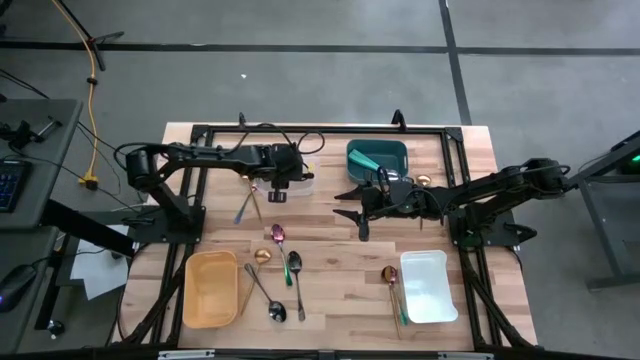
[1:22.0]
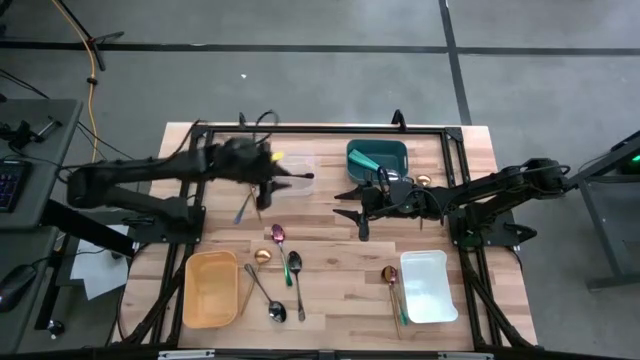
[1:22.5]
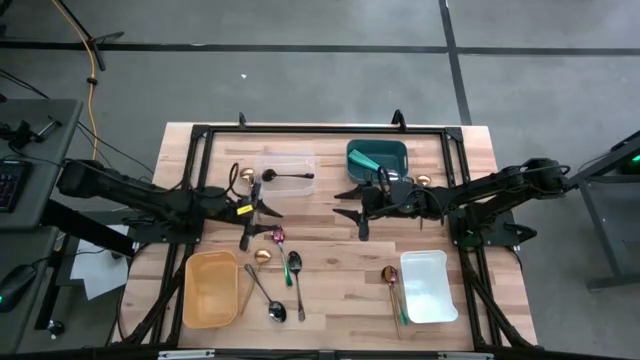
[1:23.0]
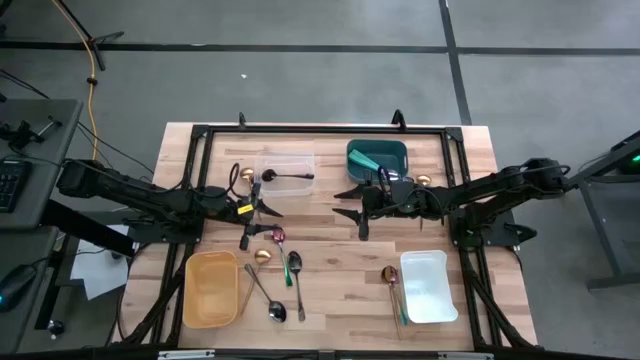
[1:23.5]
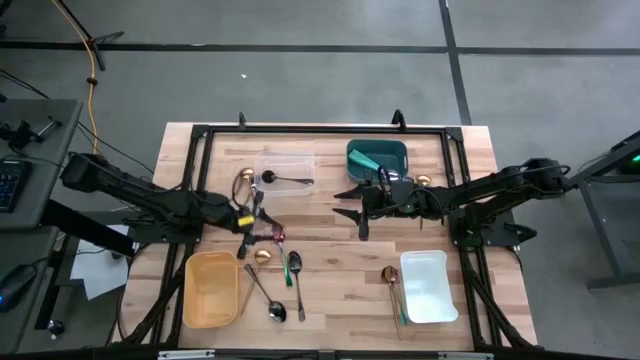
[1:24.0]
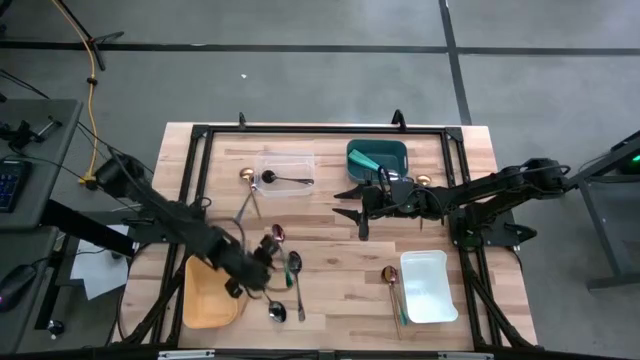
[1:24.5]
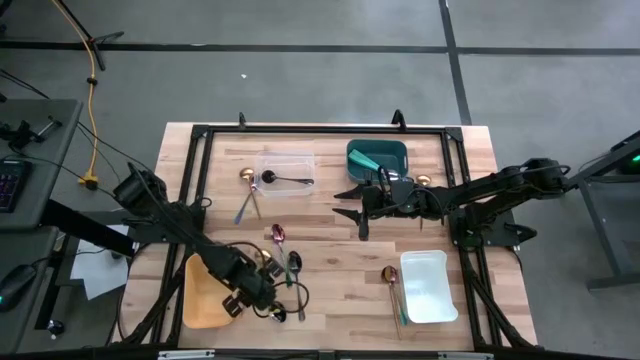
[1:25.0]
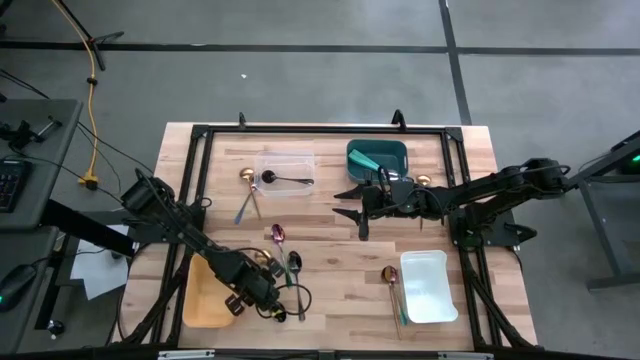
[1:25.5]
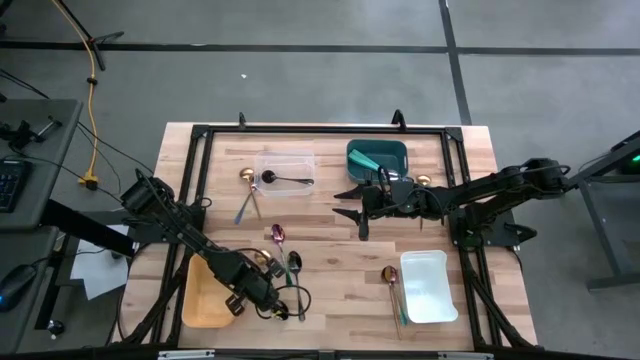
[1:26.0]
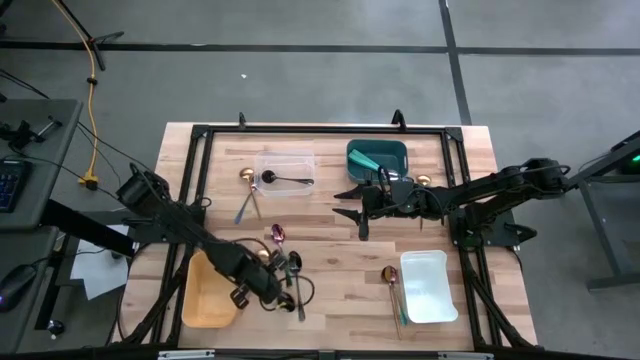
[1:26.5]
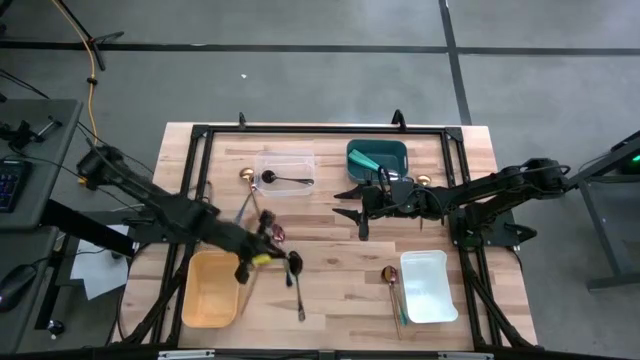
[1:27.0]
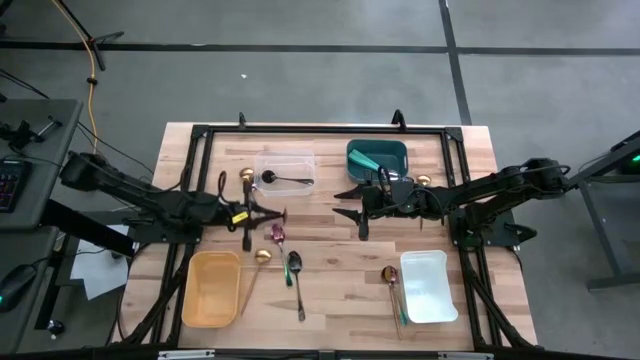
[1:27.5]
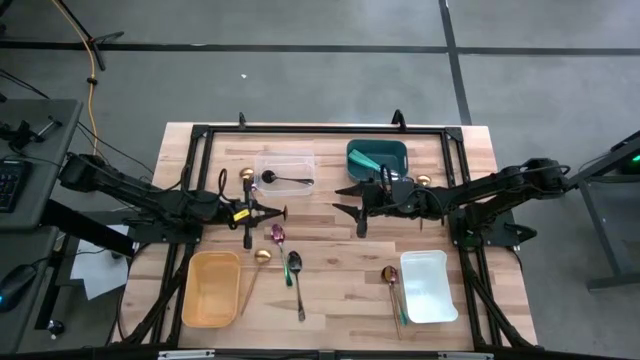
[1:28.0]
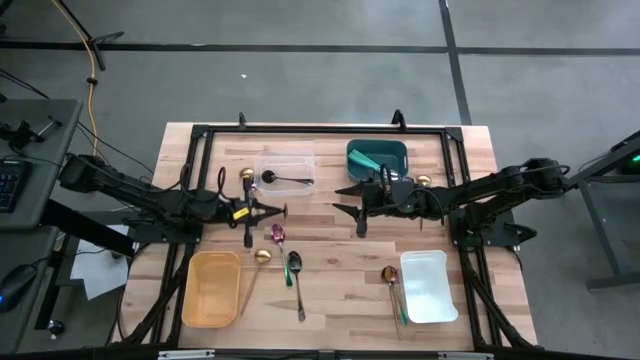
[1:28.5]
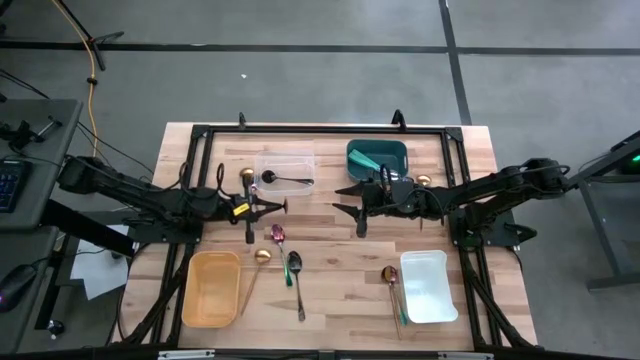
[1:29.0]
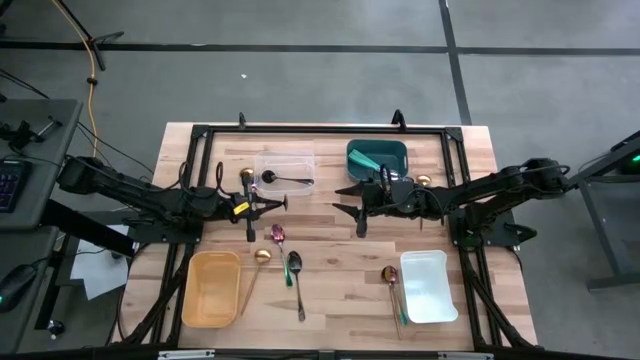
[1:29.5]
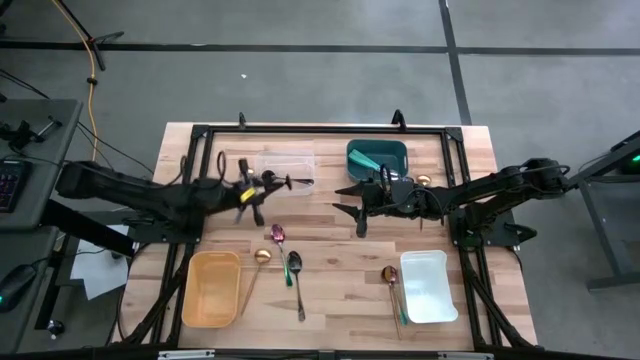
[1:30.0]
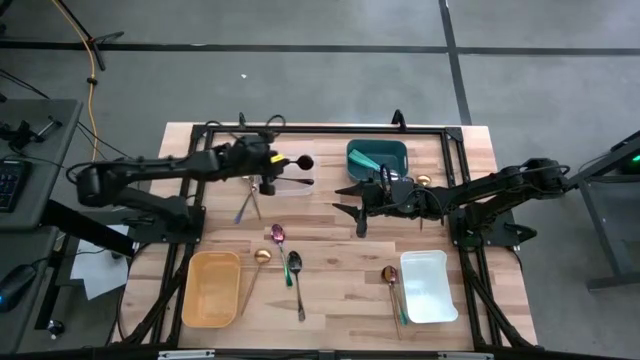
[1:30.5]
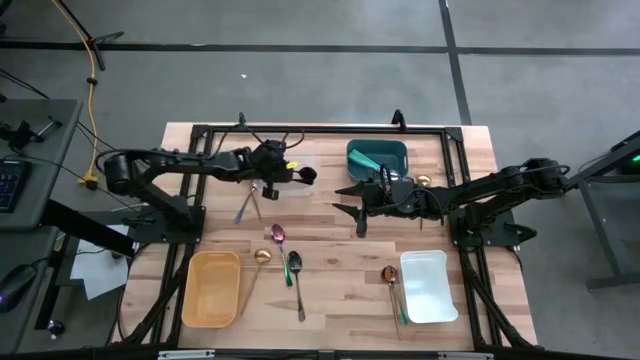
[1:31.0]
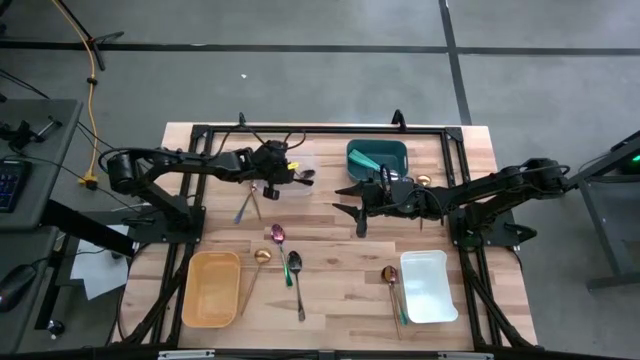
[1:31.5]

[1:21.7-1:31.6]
Task: Sort silverware by color (type)
Put the black spoon into the transparent bin

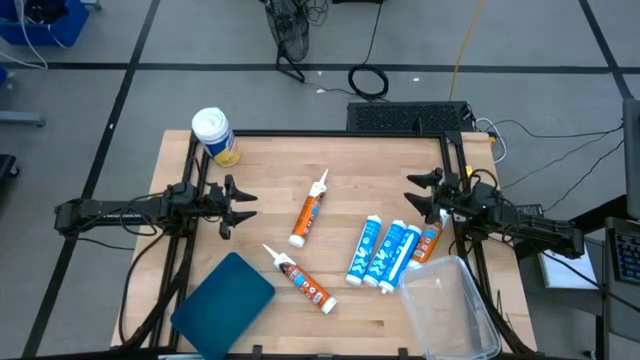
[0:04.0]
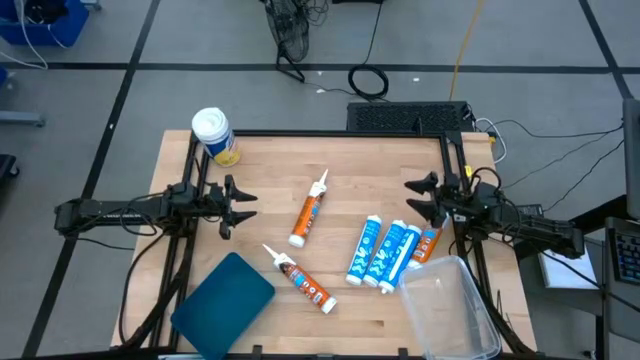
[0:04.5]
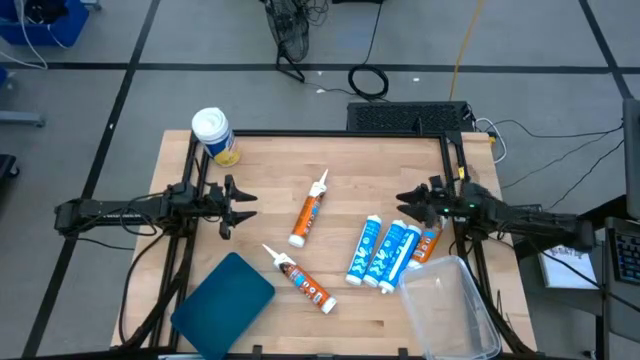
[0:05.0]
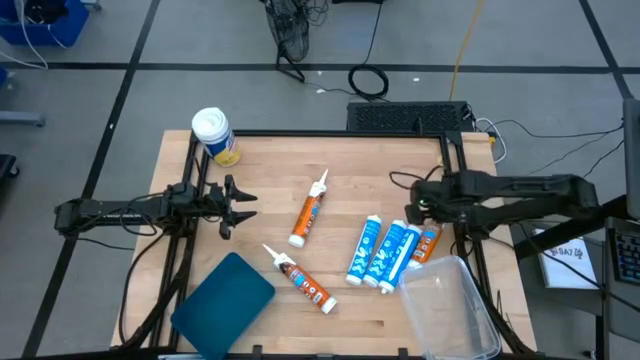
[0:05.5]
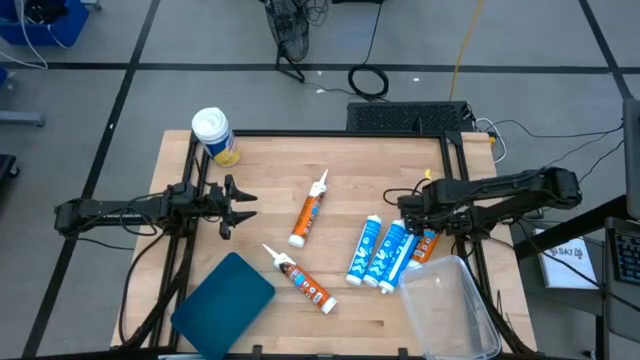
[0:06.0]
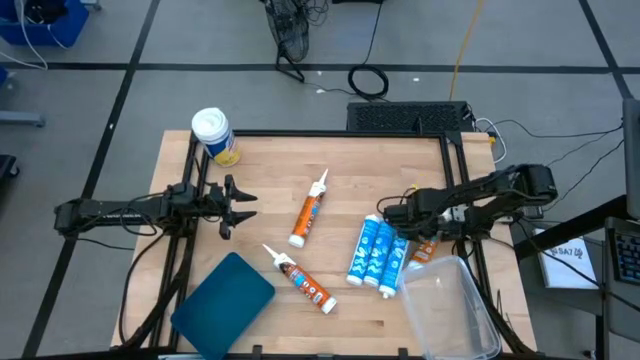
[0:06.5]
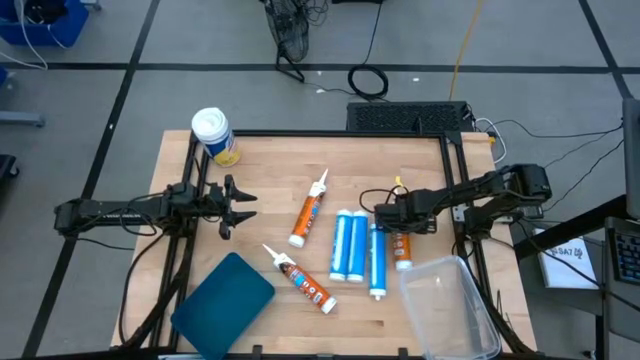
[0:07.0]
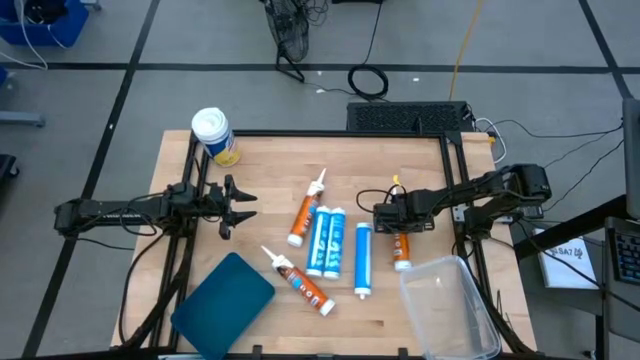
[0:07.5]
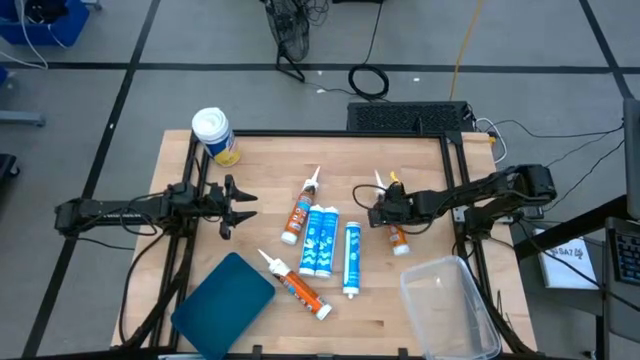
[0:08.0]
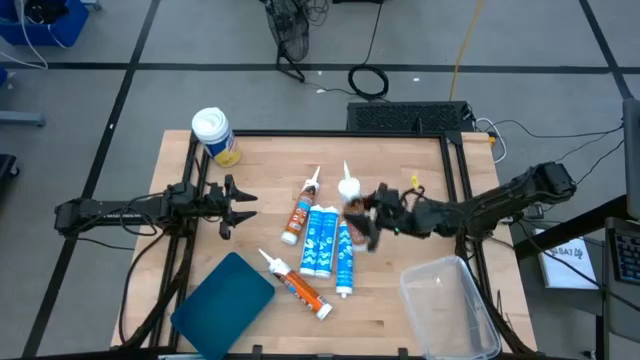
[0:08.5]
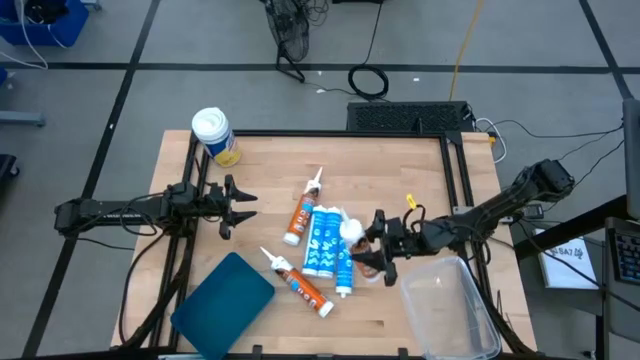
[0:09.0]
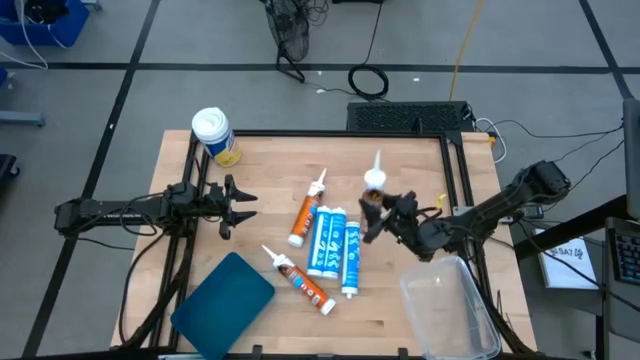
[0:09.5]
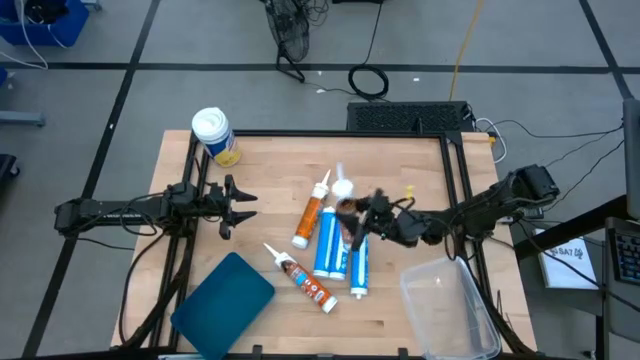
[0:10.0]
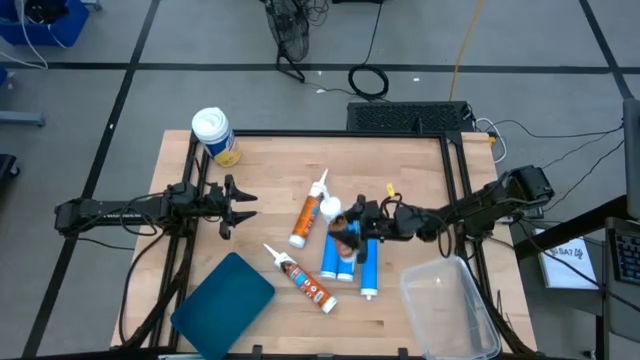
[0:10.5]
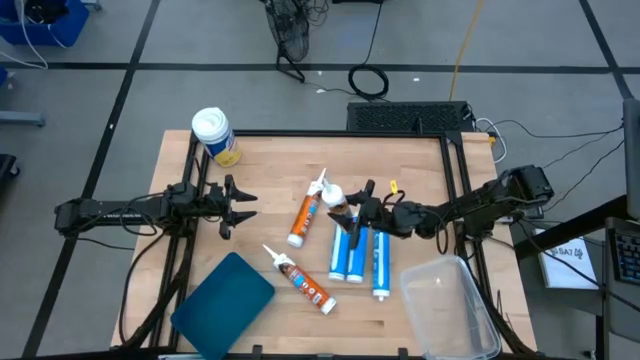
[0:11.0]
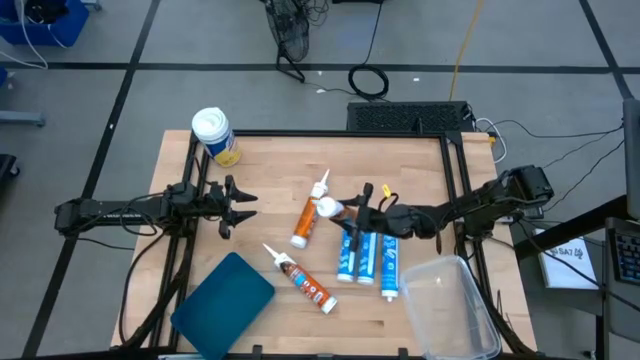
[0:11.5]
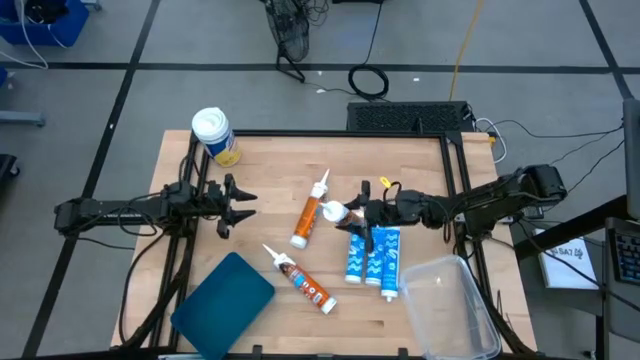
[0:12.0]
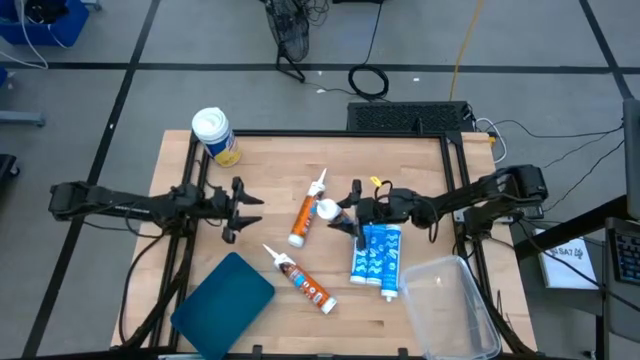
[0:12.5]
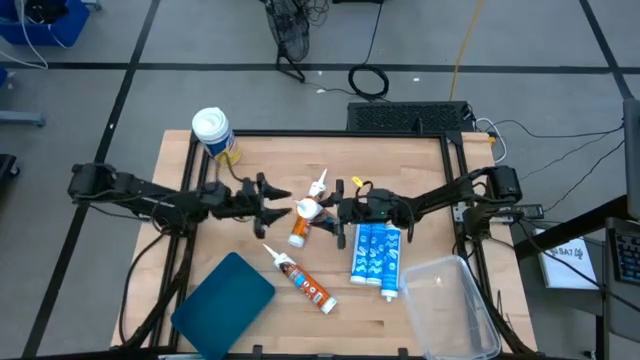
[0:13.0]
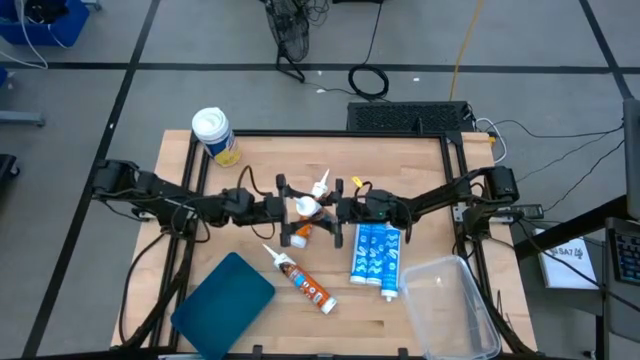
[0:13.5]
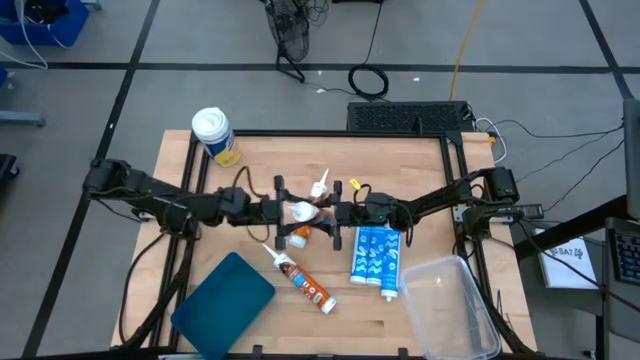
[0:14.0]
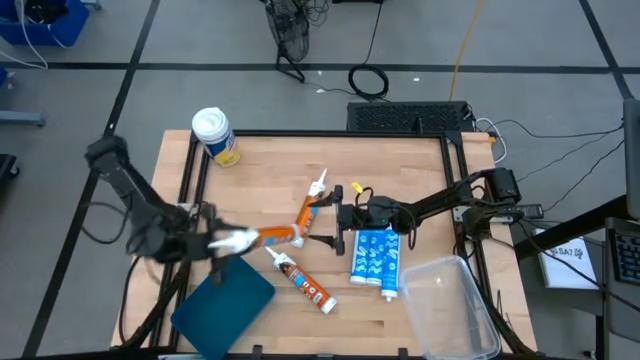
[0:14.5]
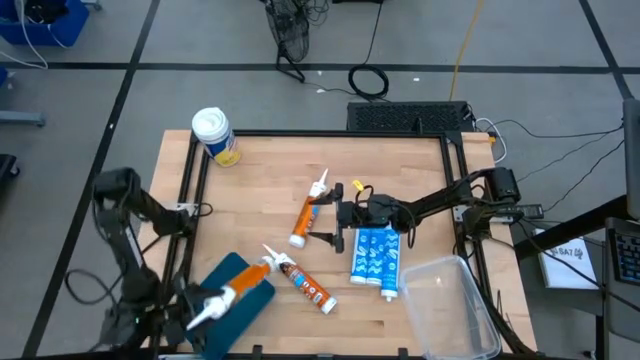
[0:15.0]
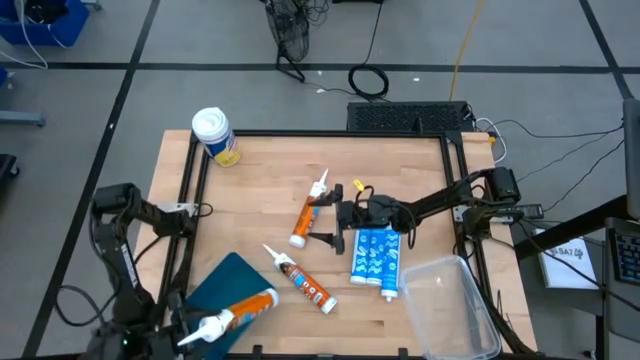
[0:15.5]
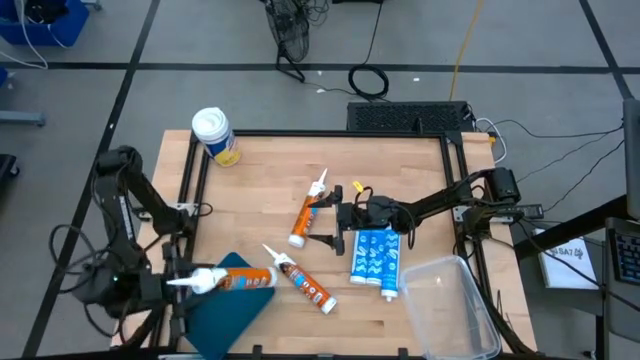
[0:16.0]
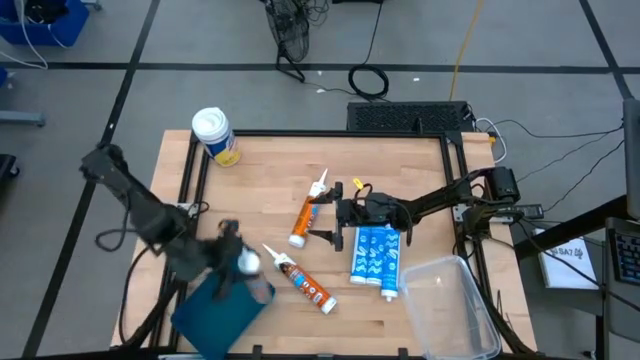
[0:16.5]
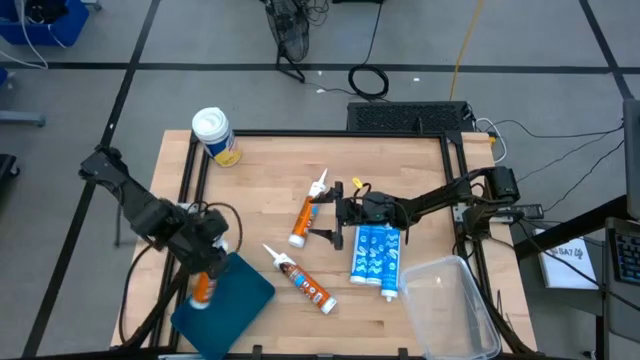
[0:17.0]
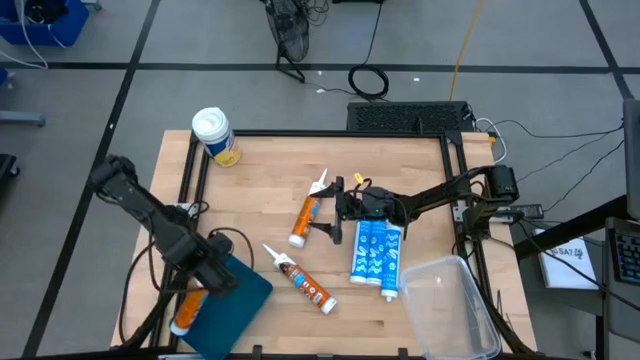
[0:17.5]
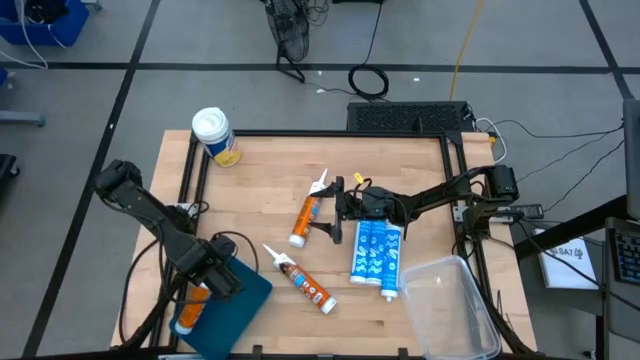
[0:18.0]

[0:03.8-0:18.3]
Task: Pick & place silicon tubes, Sealant and Lysol wipes
Put the right orange sealant into the blue bin
